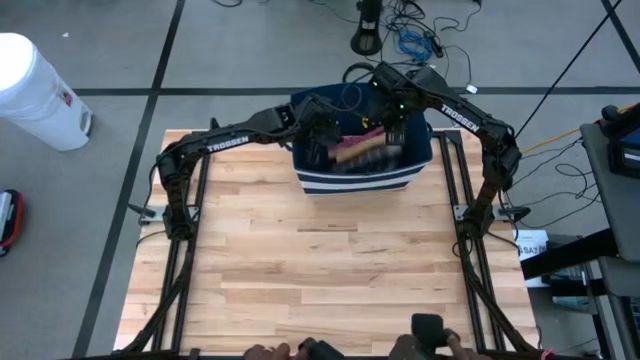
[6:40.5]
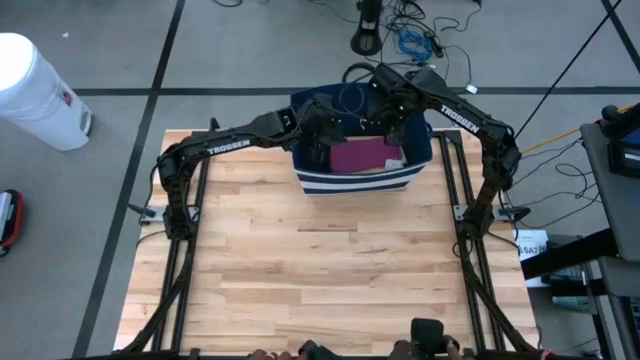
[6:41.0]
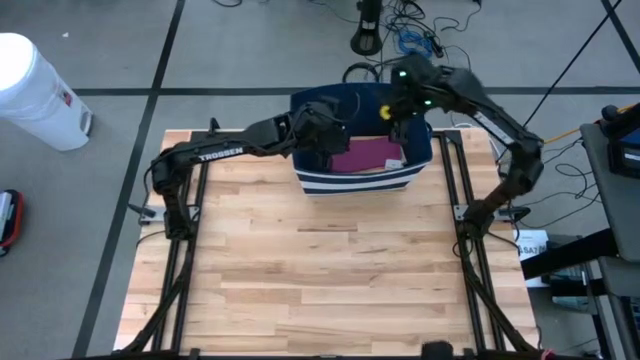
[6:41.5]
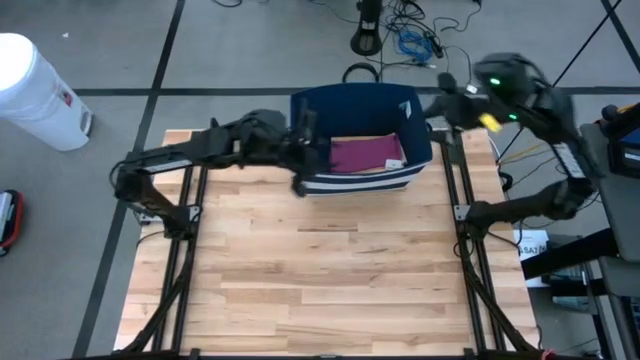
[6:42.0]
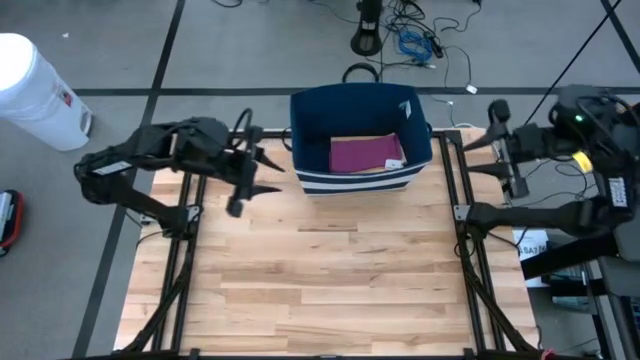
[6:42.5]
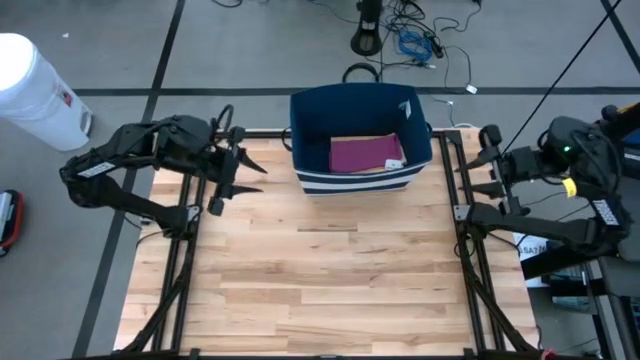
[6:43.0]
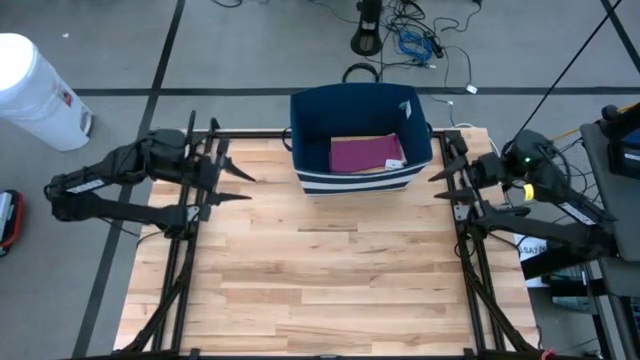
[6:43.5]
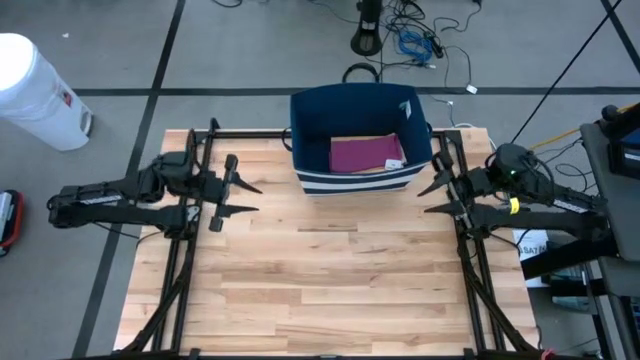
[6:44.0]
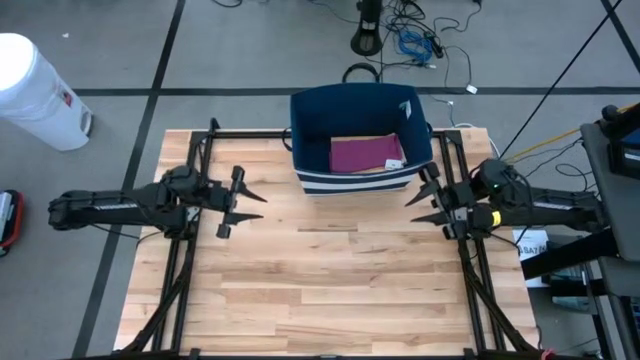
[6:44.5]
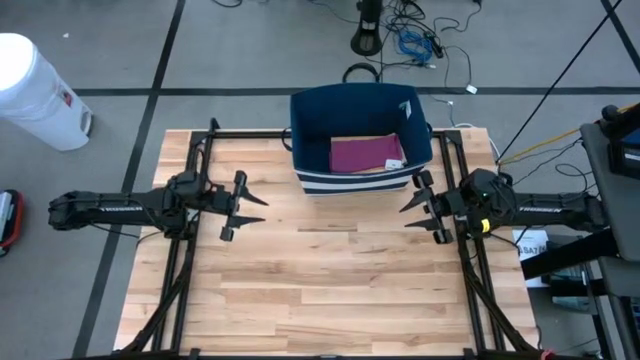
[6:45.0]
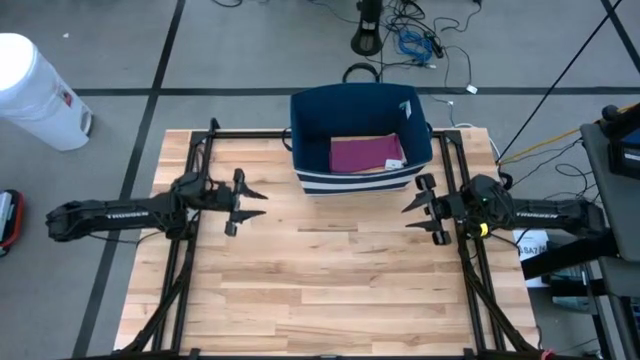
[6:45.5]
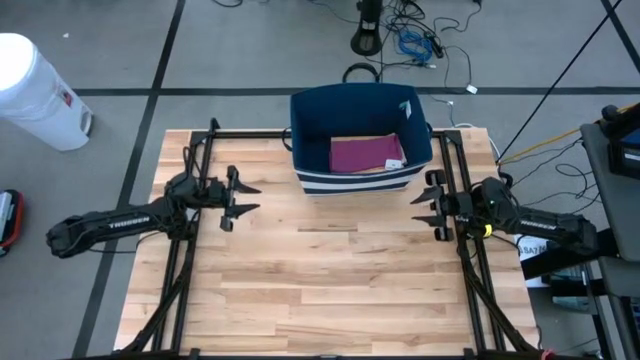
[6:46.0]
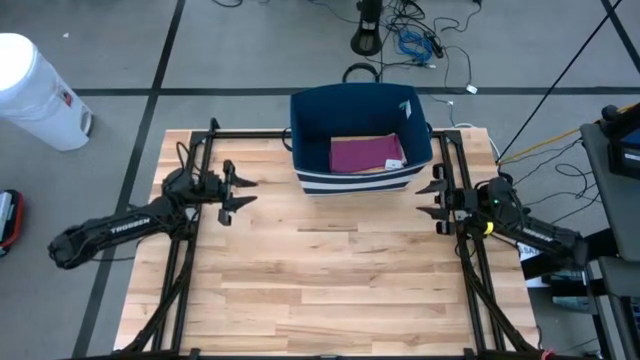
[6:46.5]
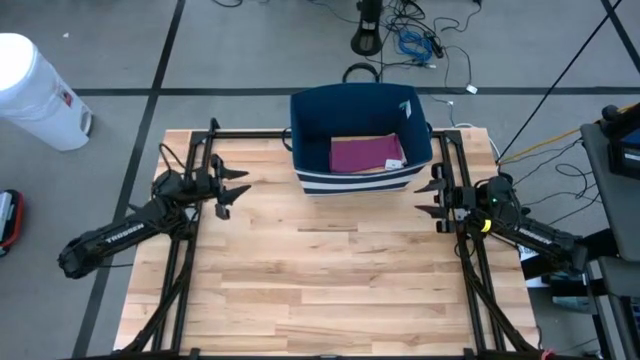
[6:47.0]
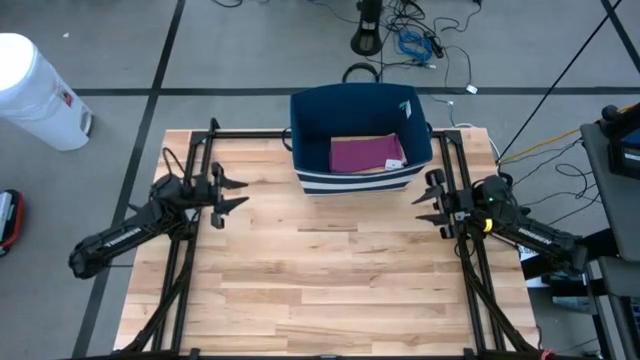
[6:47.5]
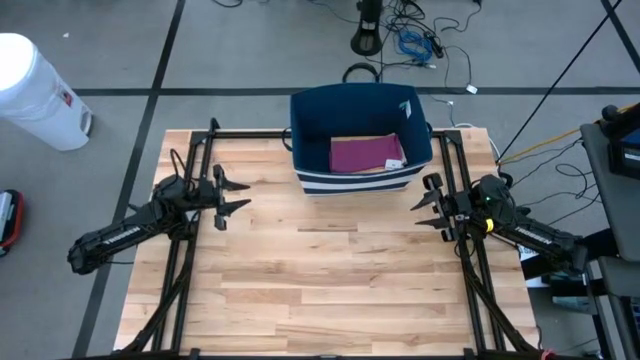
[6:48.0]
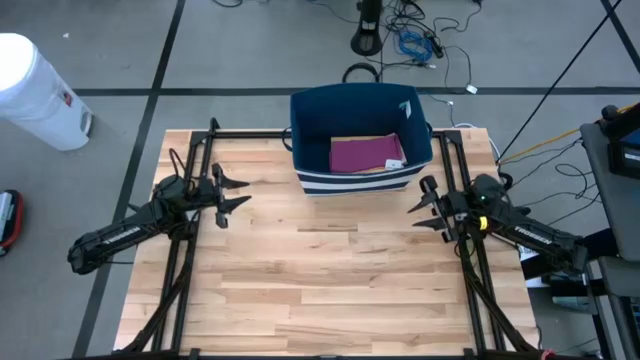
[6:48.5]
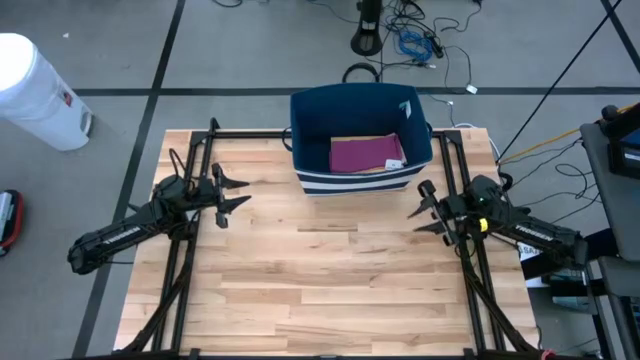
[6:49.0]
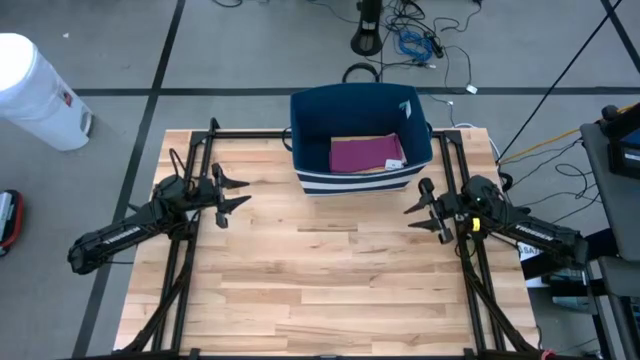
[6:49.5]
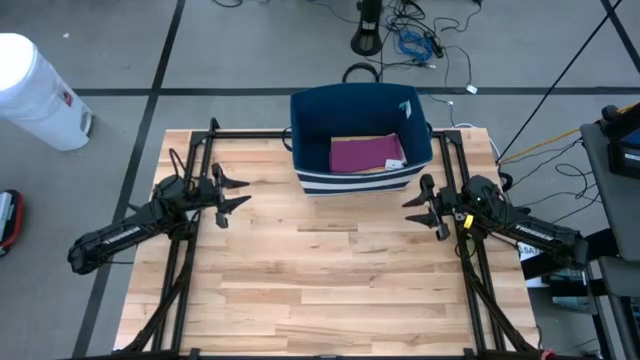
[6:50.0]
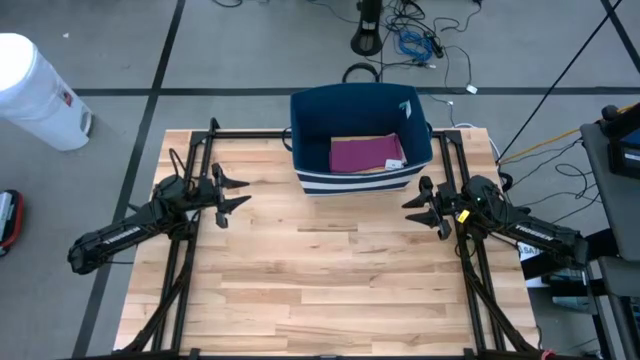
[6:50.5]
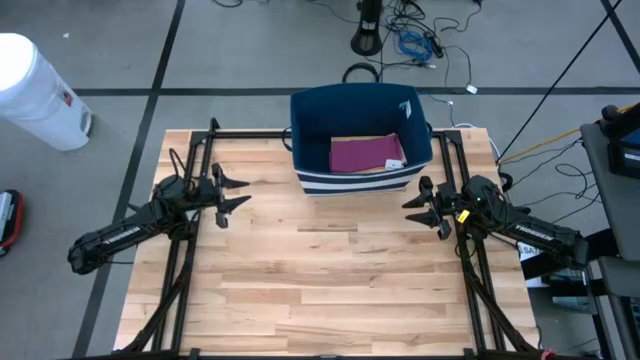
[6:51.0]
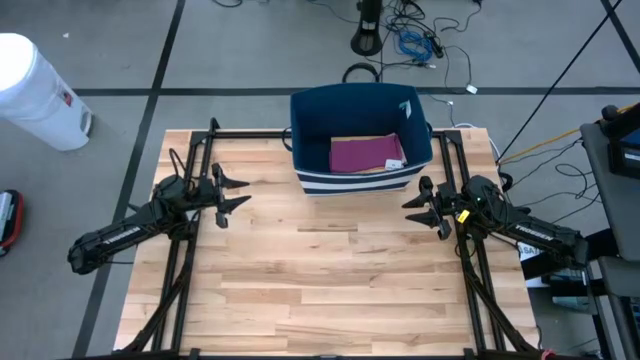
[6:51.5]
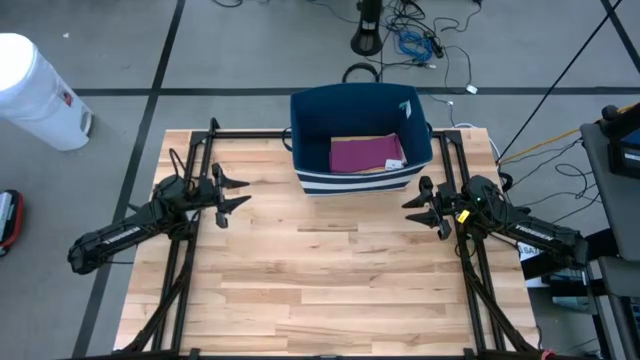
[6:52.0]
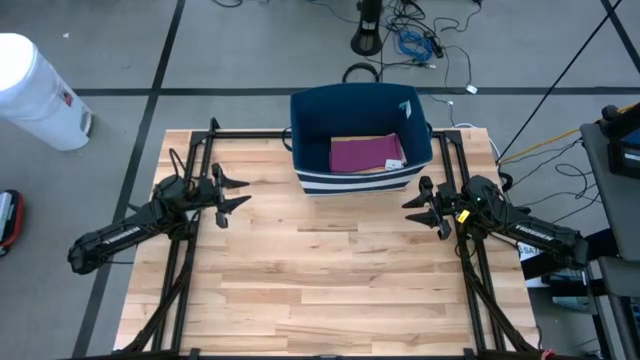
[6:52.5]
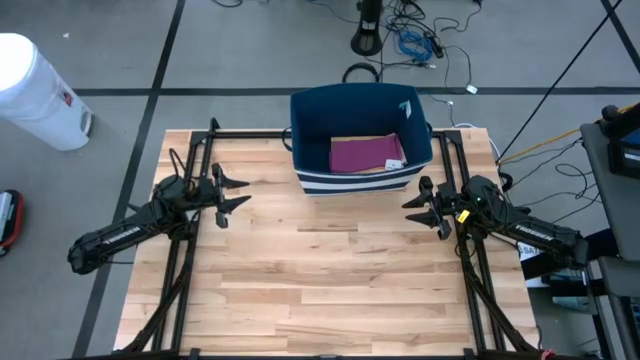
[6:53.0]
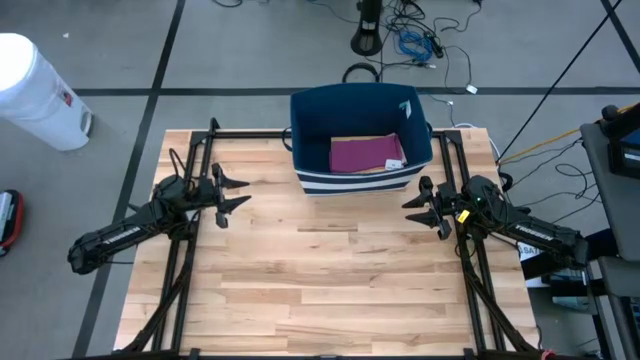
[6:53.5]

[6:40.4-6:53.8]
Task: Fold towel
Return to Home Position

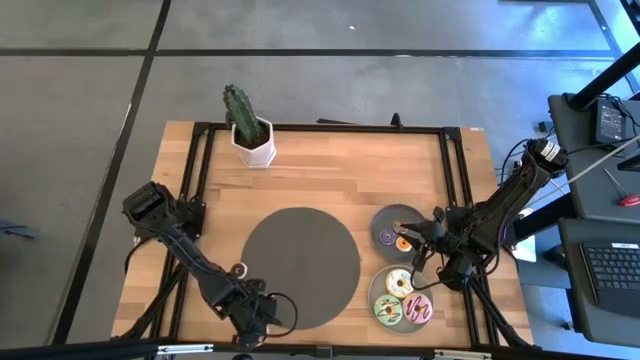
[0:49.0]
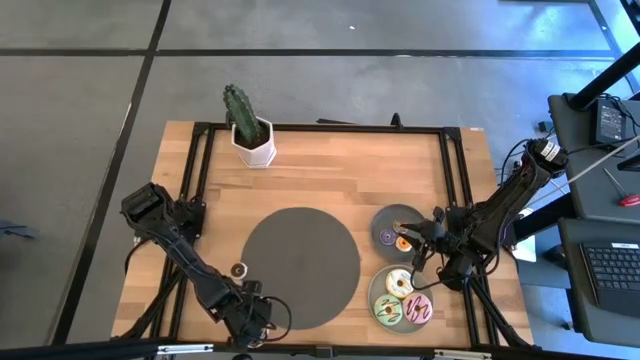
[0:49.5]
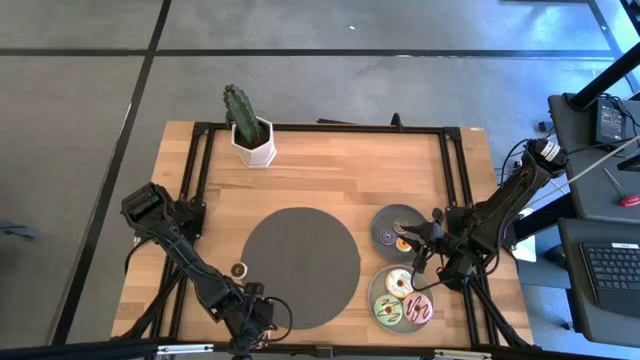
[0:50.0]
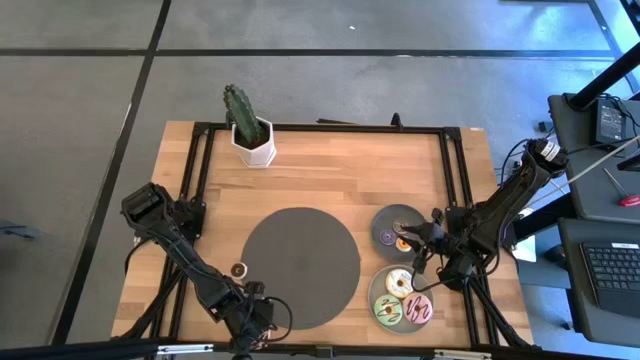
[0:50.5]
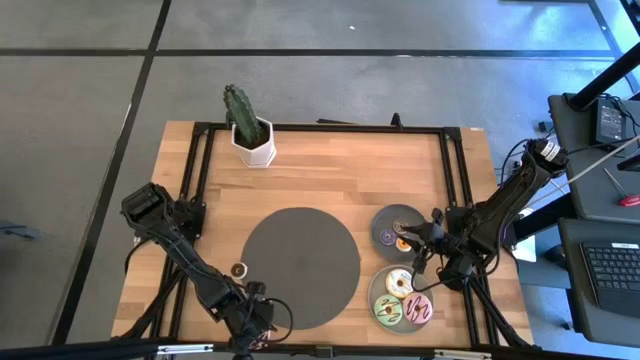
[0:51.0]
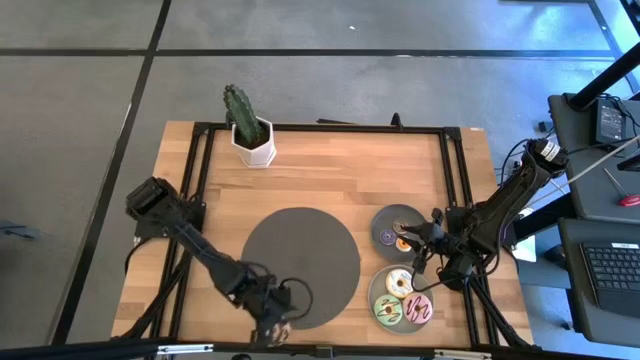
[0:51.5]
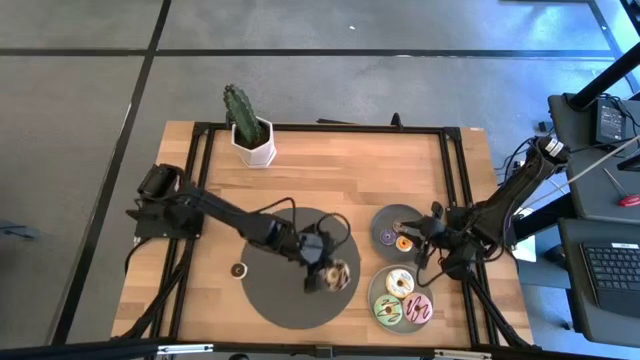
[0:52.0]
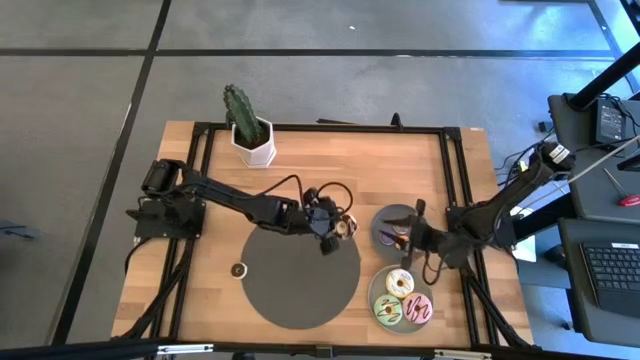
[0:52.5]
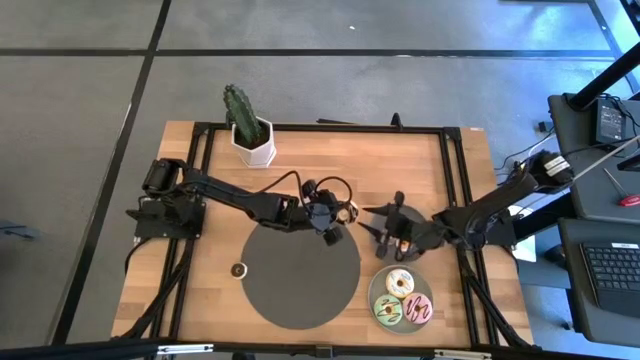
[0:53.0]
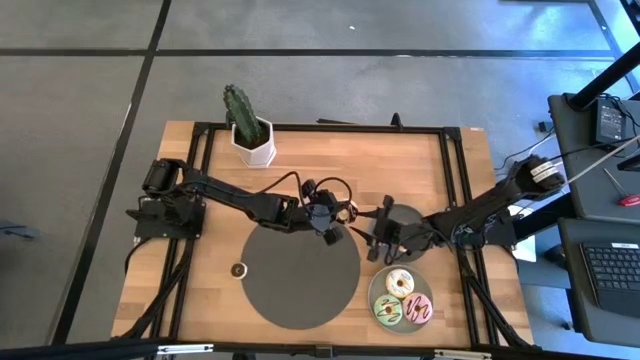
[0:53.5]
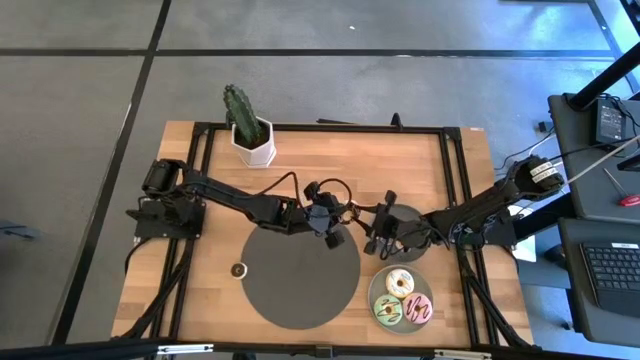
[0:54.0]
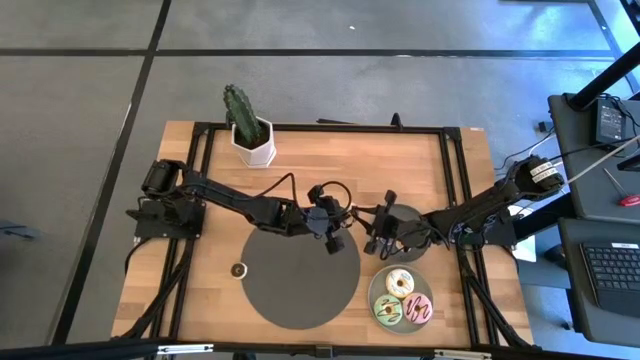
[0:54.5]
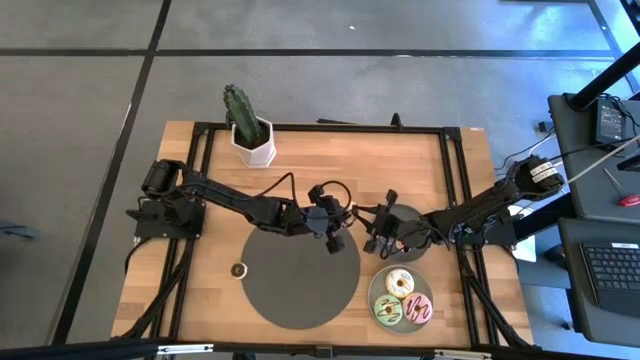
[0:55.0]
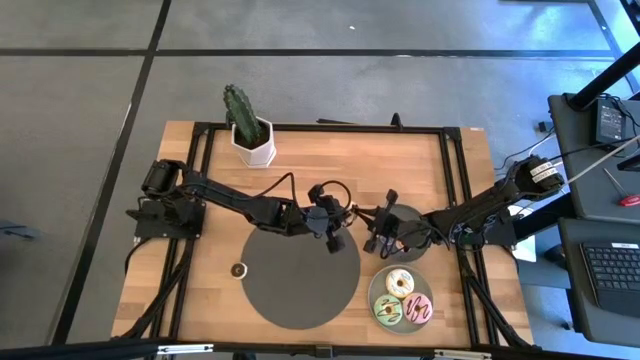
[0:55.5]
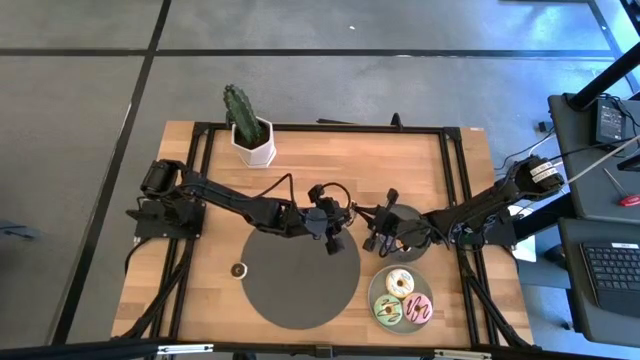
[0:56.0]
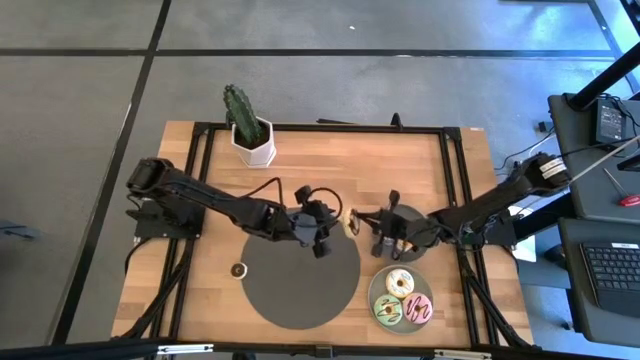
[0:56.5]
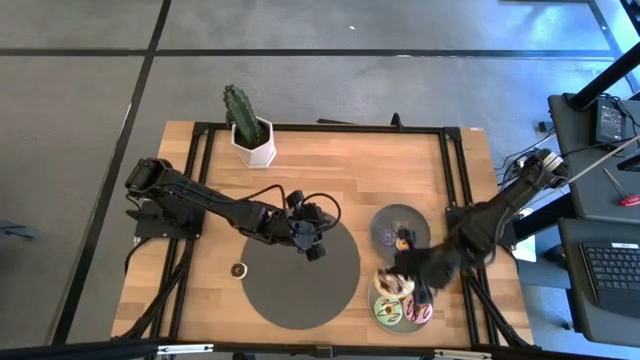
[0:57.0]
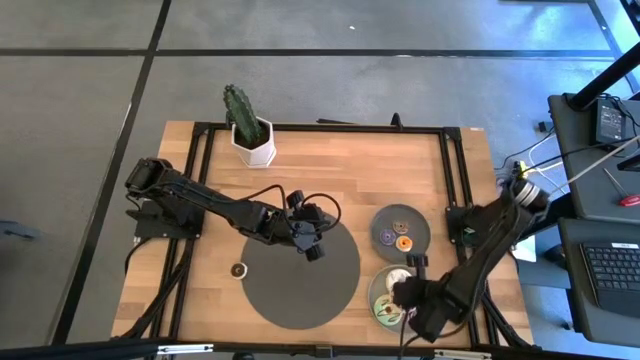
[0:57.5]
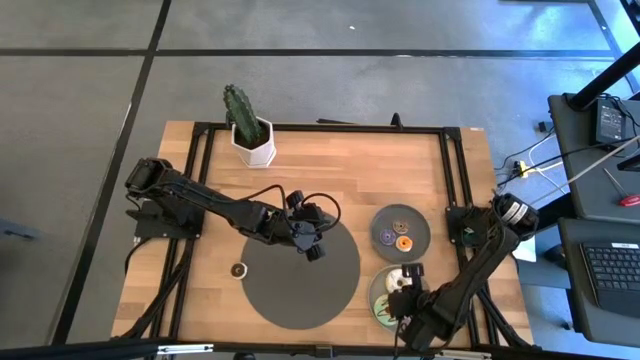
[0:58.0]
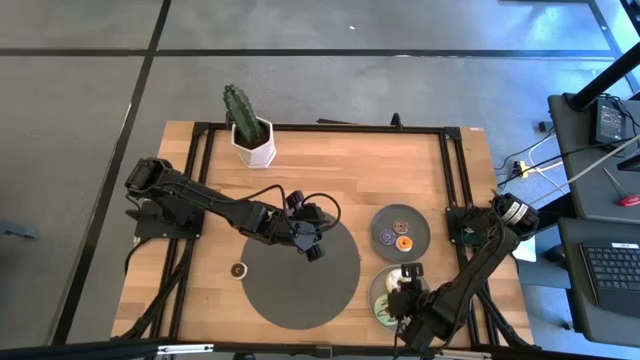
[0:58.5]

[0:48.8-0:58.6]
Task: Pick & Place donuts
Put the large black donut on the light gray plate
